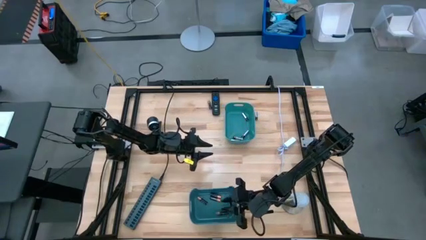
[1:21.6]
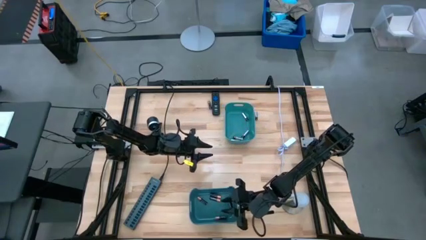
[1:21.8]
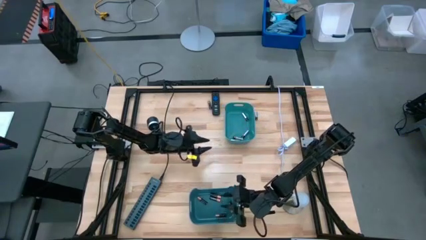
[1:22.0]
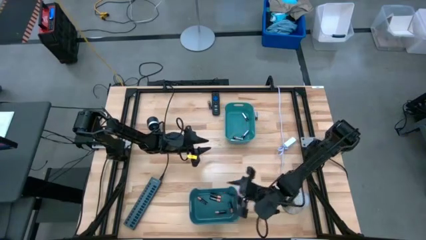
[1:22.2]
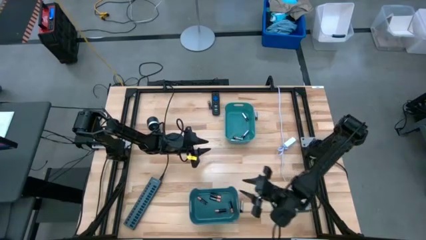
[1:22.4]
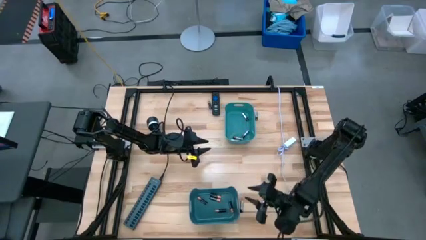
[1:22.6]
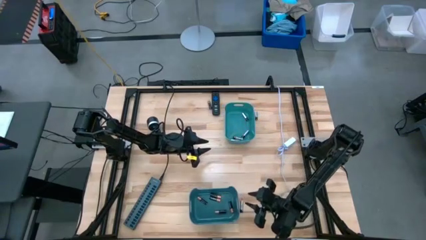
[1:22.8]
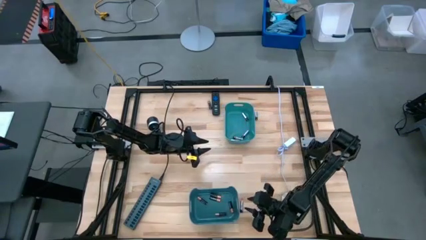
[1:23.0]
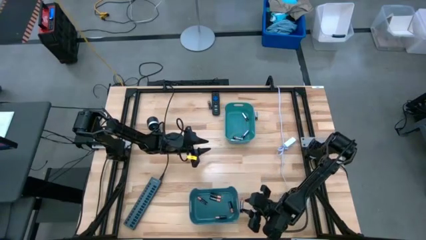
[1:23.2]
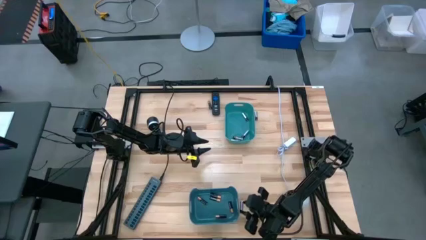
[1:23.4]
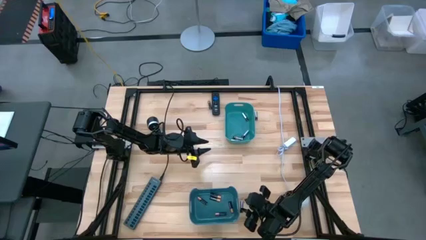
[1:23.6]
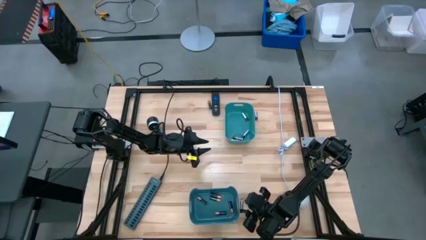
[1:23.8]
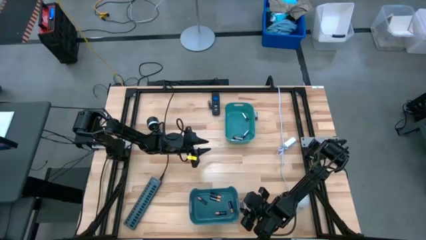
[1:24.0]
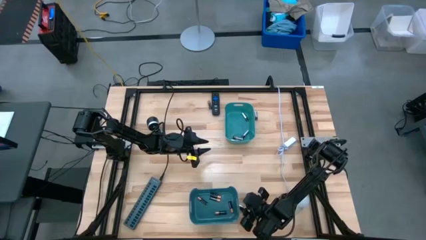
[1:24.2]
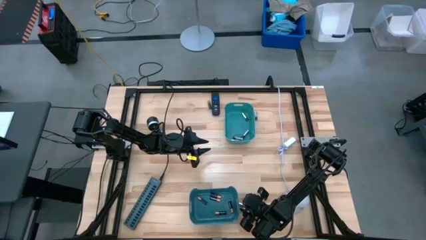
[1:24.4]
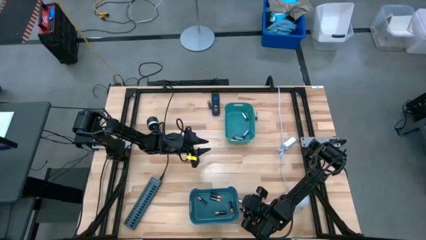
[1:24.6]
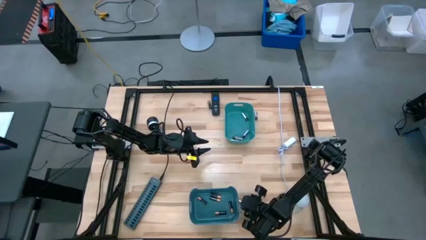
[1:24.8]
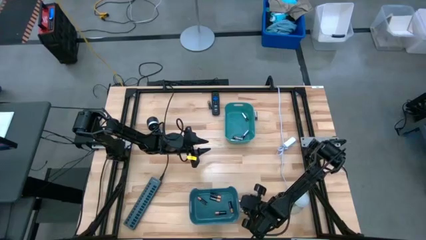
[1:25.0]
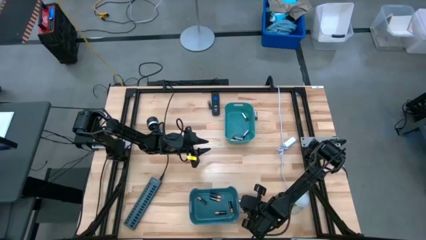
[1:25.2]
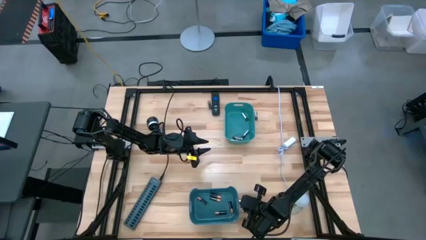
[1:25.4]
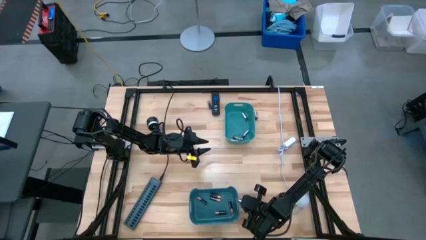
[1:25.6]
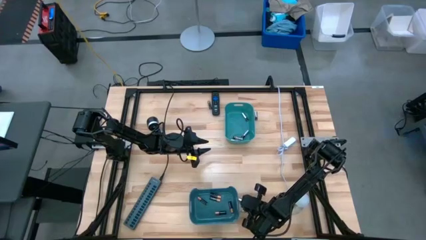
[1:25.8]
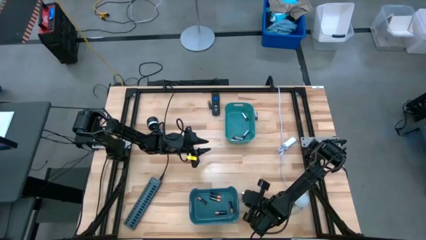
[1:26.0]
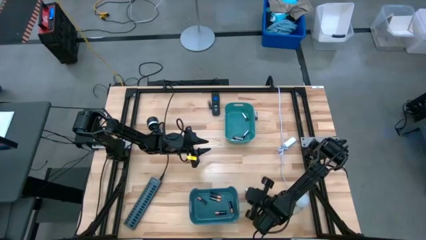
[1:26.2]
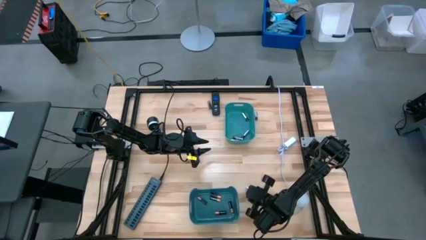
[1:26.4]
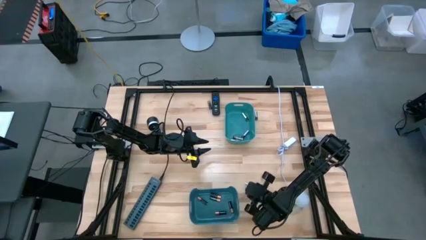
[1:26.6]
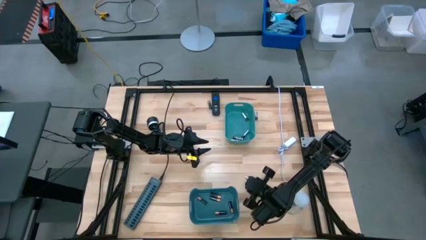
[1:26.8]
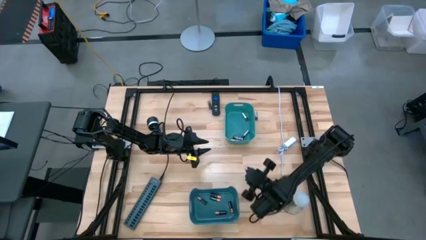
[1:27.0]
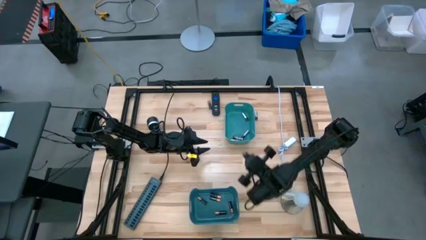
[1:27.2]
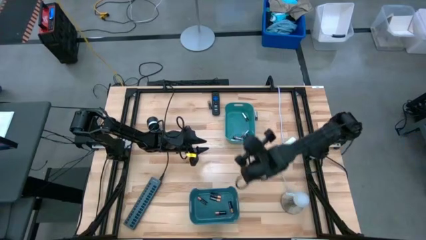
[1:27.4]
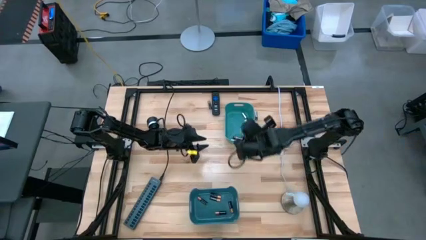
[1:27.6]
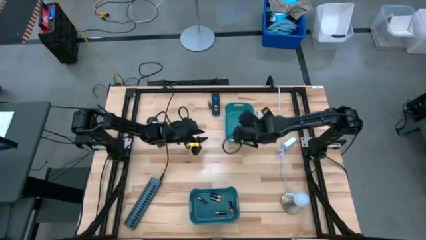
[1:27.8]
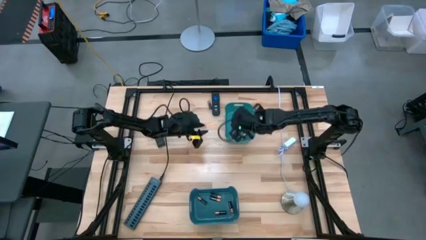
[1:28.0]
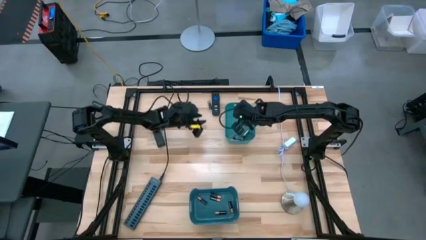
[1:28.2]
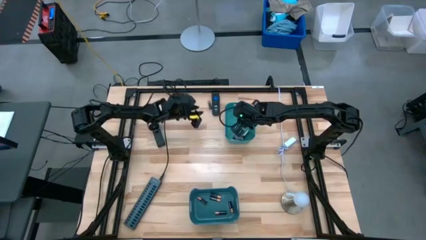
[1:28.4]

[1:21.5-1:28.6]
Task: Sort batteries
Put the silver battery into the light blue bin

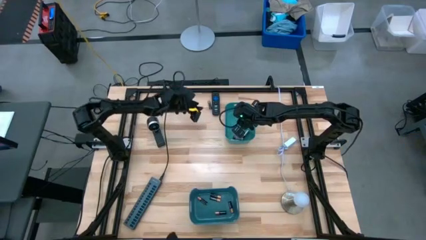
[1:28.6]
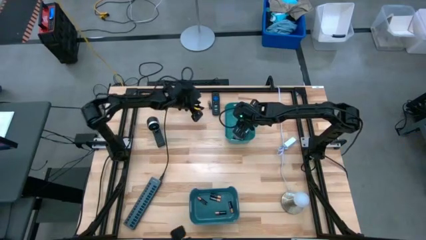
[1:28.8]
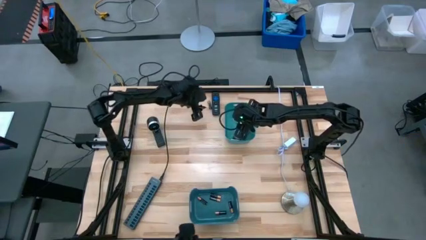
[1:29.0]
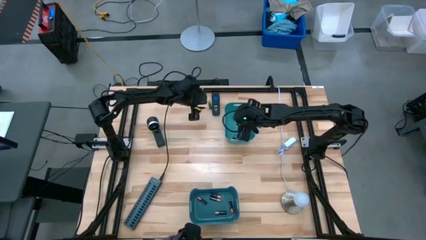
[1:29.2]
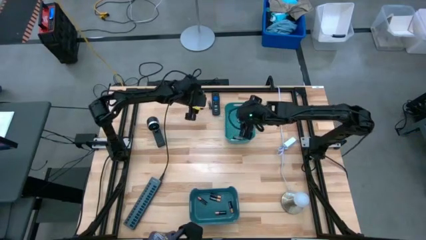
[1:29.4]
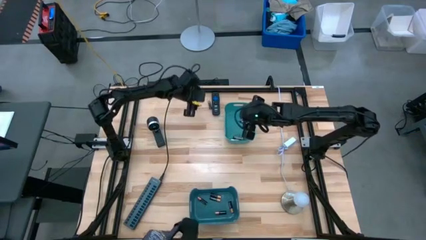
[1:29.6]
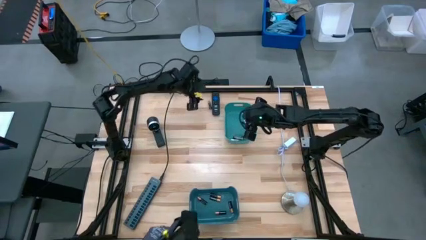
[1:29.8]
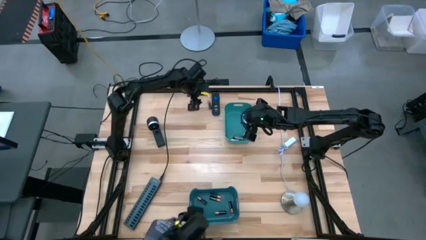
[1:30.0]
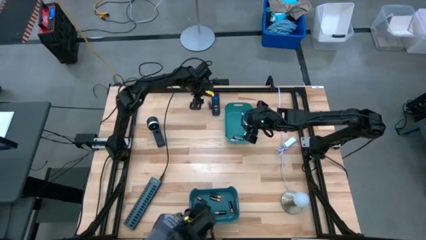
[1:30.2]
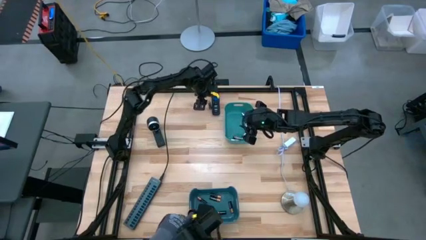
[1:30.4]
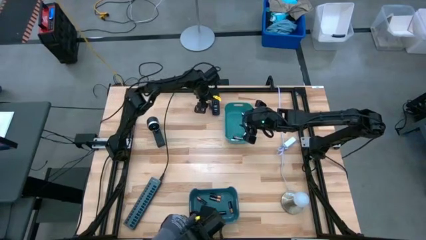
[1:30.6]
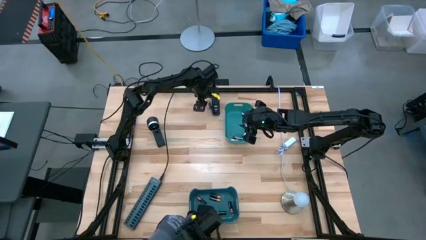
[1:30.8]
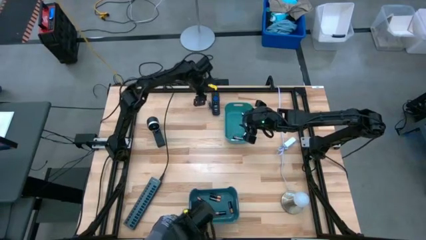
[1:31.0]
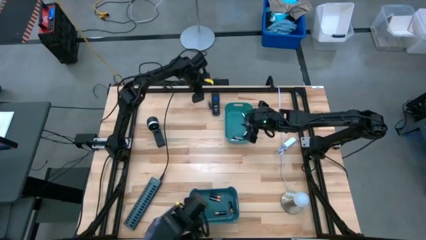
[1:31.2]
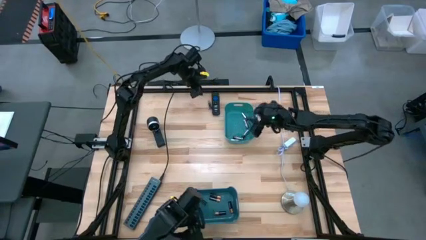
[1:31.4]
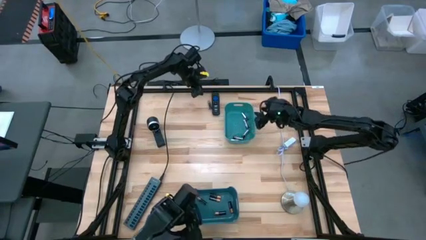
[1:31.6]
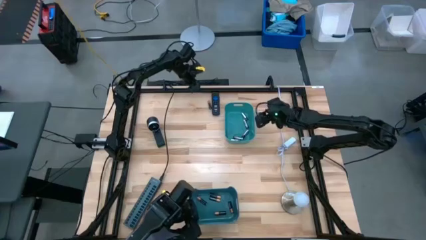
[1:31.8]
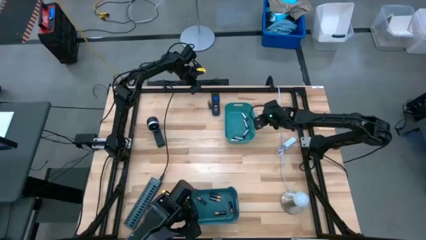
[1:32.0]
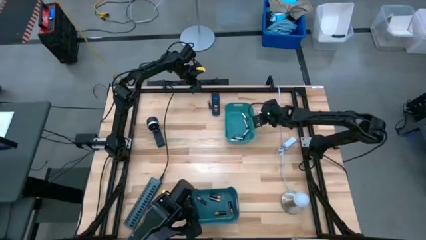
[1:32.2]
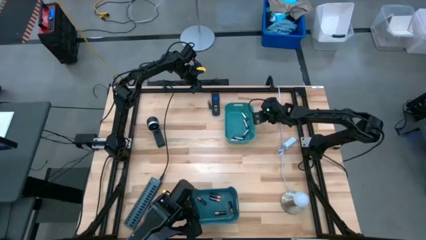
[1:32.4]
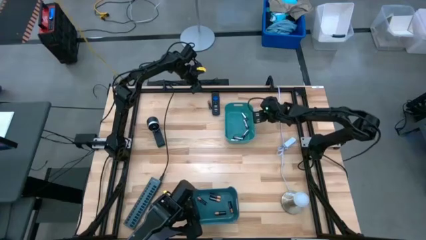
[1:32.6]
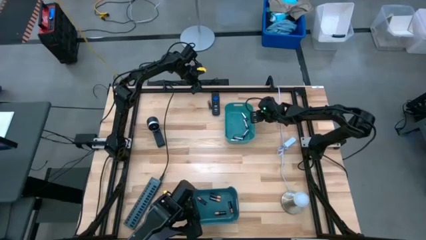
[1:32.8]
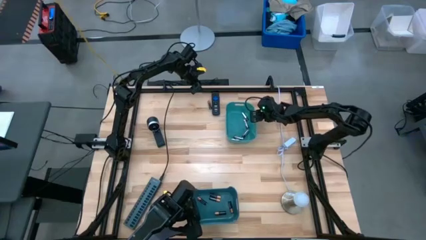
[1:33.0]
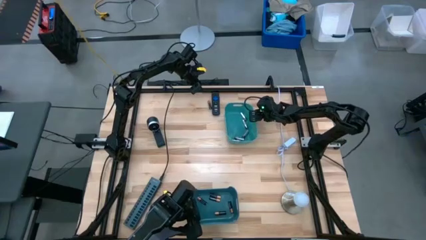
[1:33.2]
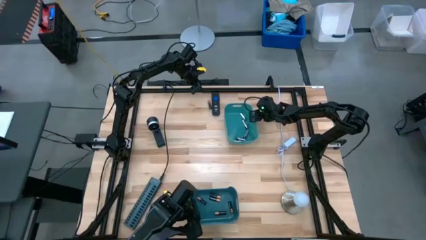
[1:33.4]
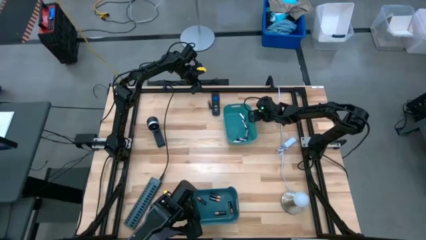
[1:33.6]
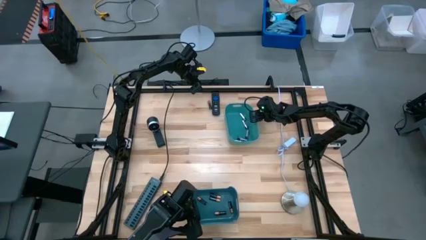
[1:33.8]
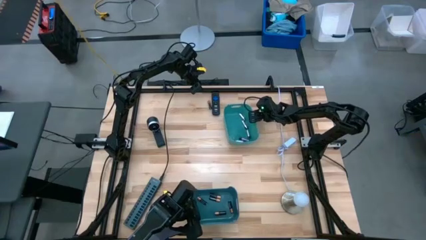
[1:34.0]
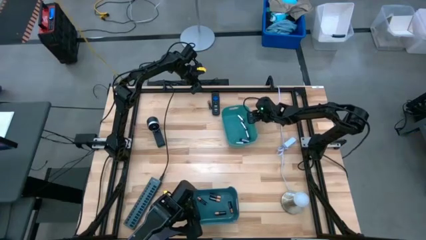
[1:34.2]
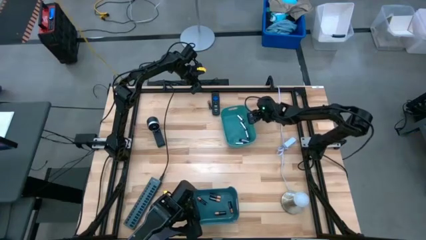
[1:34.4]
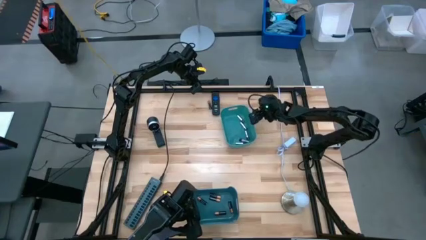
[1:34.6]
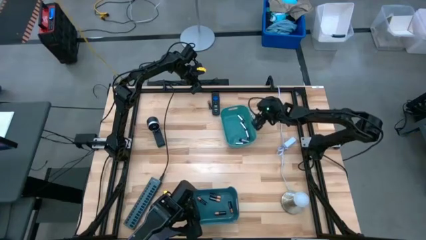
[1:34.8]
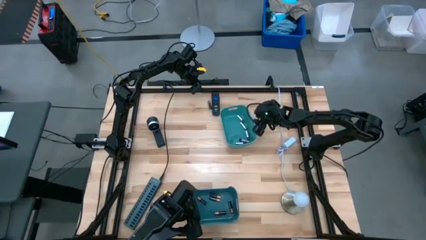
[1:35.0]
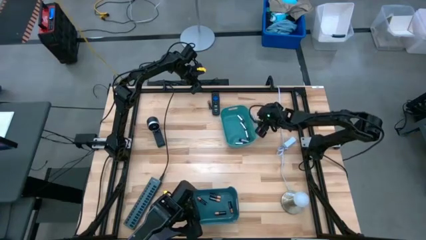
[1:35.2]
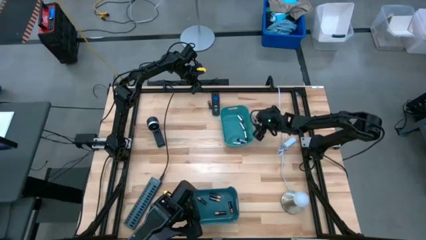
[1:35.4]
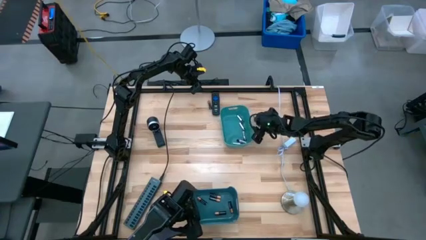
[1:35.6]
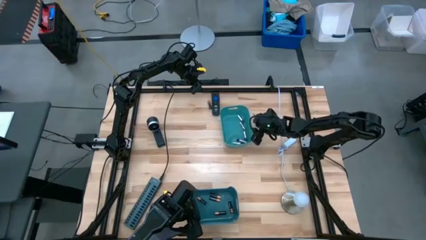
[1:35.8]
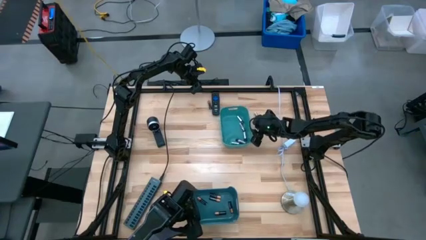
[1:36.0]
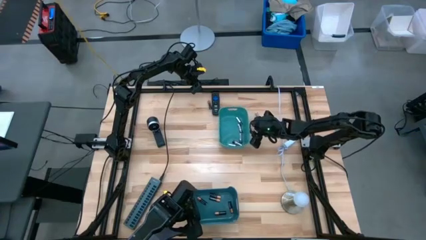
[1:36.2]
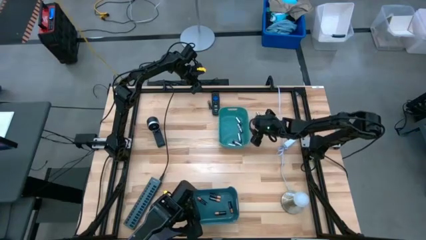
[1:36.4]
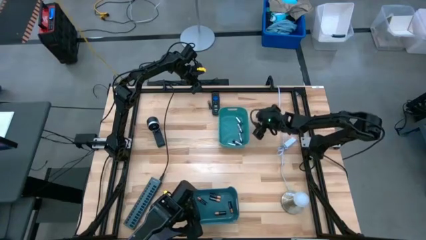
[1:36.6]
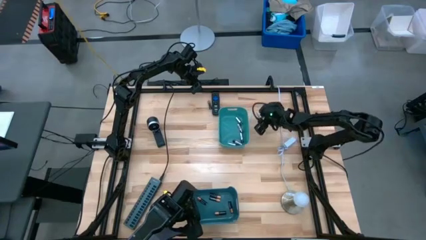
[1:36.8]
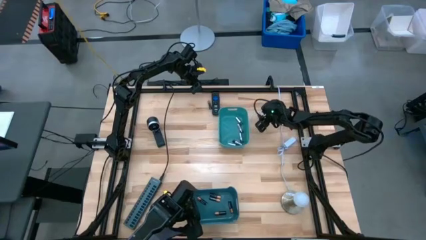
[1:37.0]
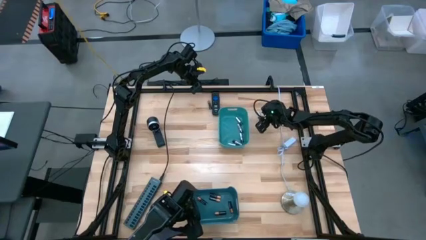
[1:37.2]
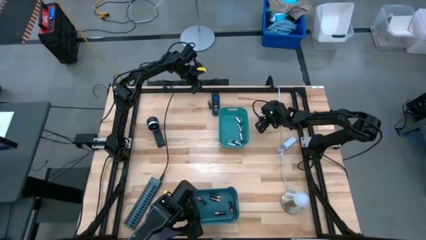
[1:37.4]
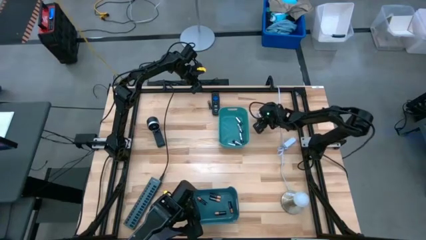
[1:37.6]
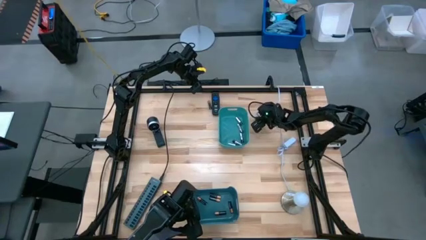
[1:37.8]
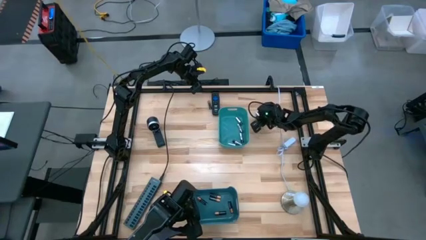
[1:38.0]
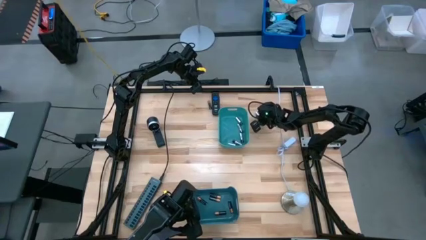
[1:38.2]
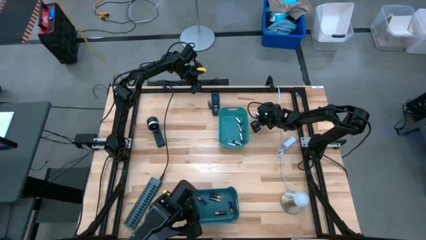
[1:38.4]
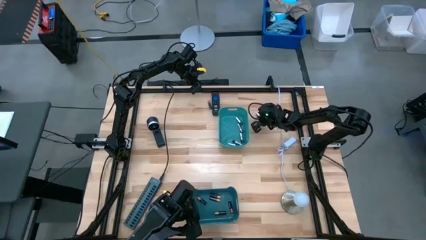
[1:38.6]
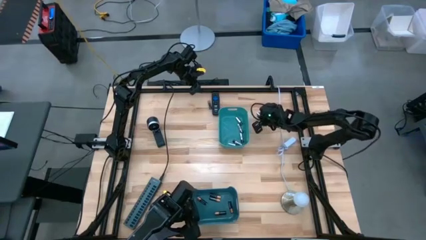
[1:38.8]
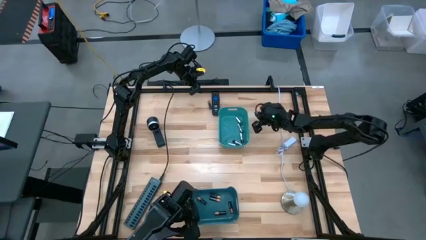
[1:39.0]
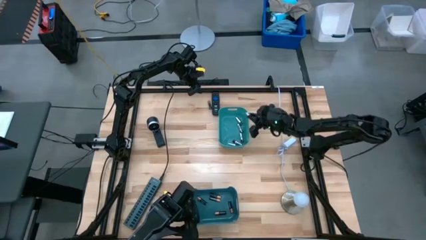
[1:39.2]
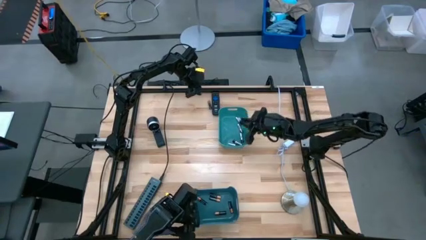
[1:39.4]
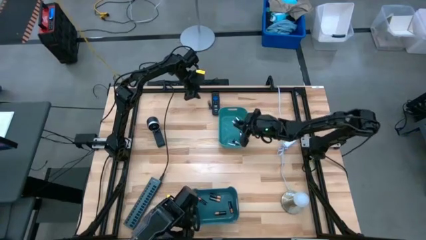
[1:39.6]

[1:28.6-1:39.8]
Put the silver battery into the light blue bin

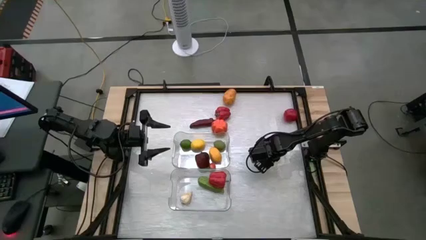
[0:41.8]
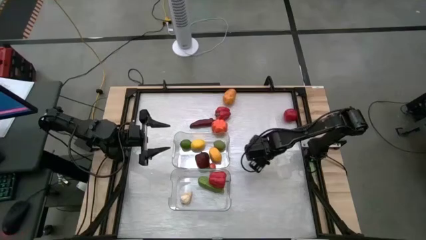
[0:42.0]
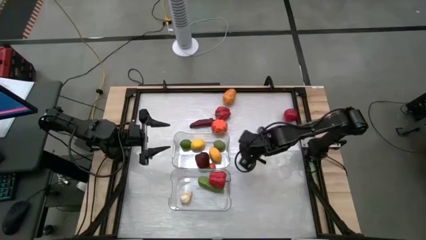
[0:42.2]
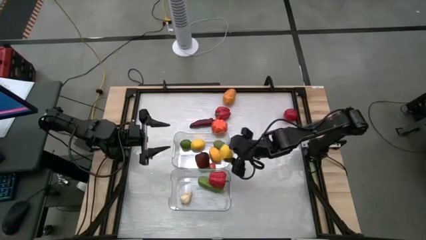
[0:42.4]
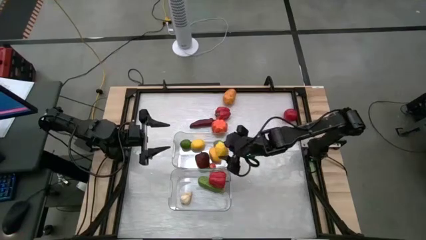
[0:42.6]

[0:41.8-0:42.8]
Task: Sort produce into baskets
Put the lemon into the top transparent bin
